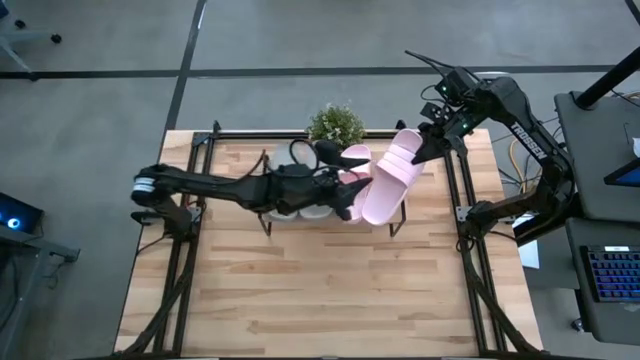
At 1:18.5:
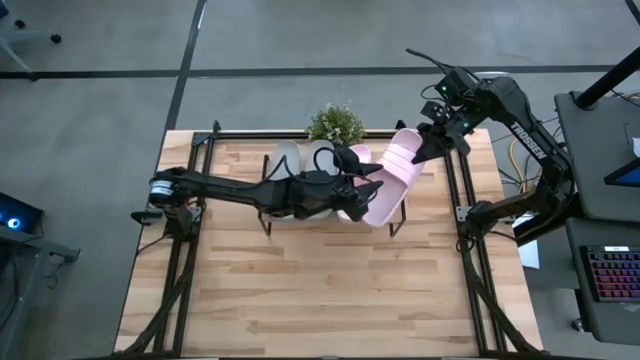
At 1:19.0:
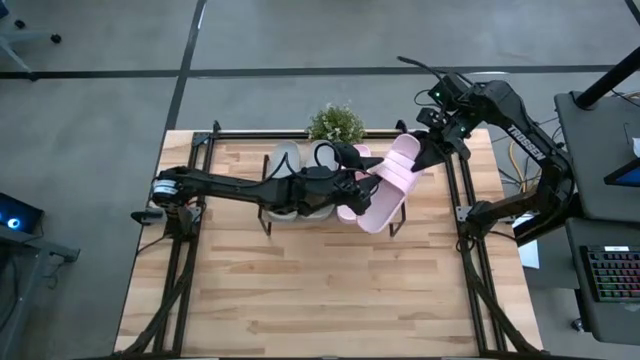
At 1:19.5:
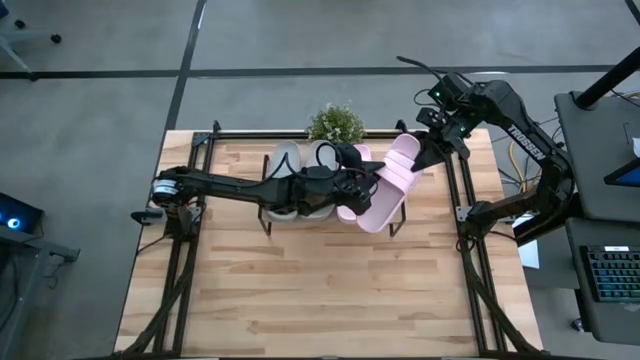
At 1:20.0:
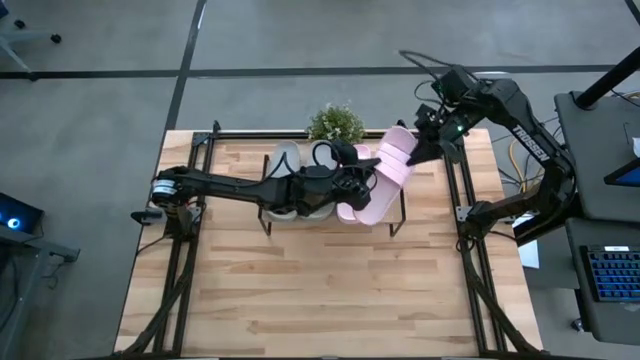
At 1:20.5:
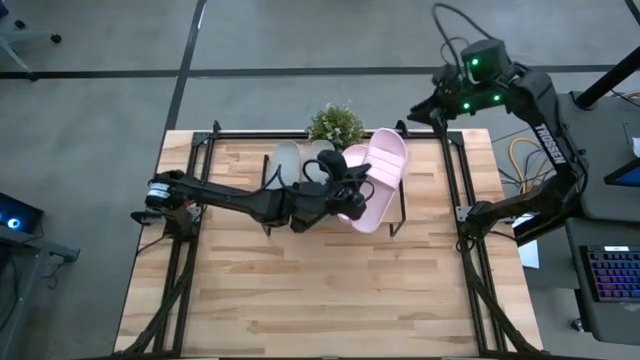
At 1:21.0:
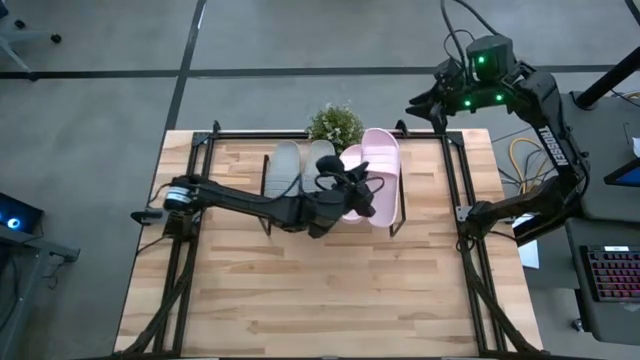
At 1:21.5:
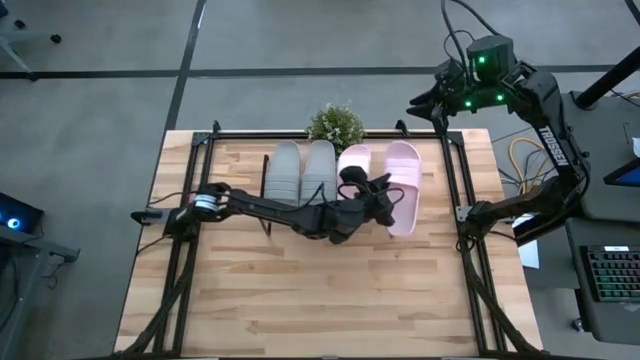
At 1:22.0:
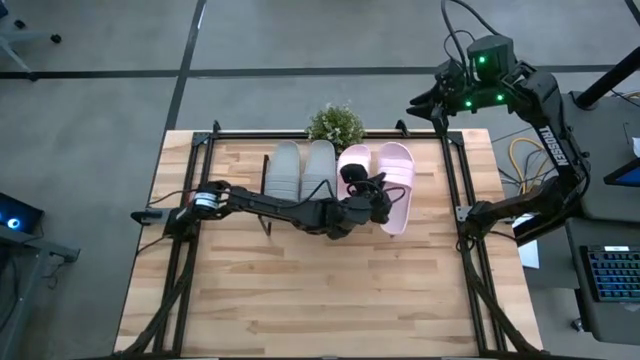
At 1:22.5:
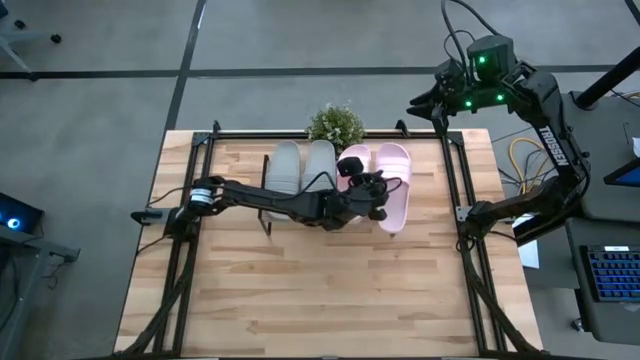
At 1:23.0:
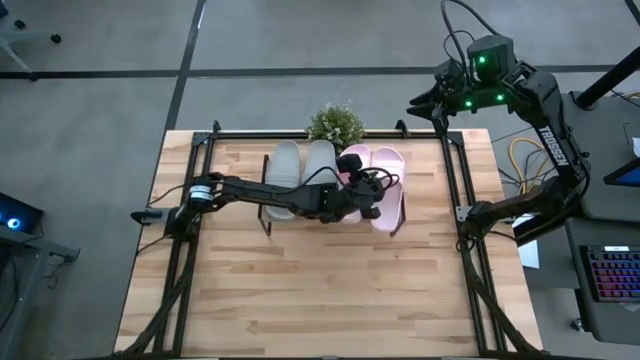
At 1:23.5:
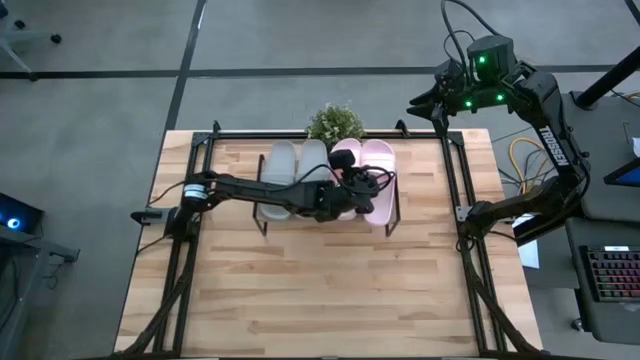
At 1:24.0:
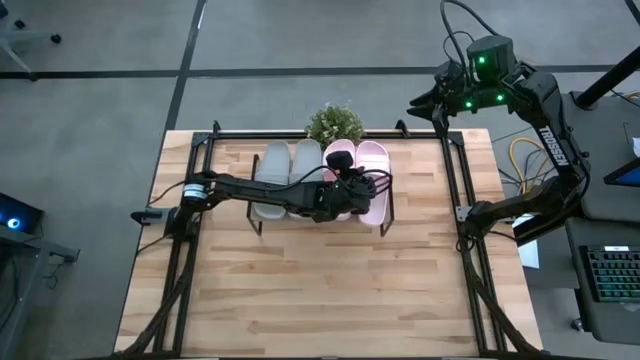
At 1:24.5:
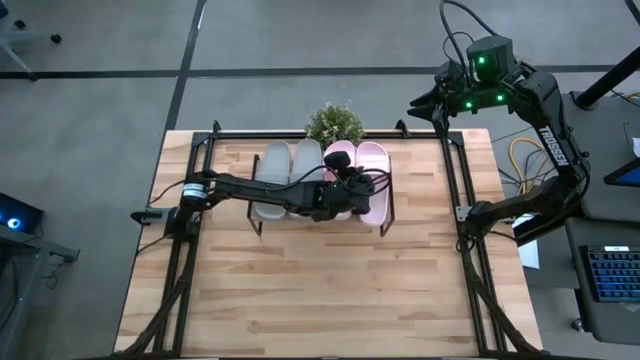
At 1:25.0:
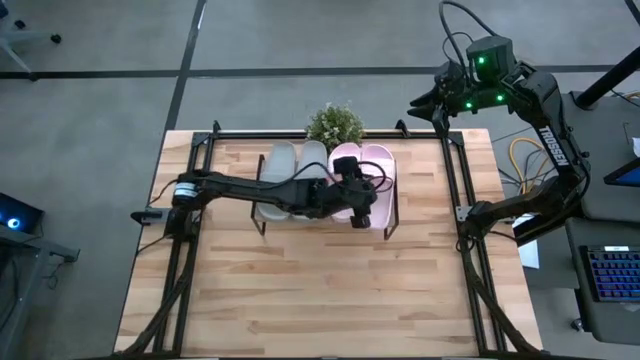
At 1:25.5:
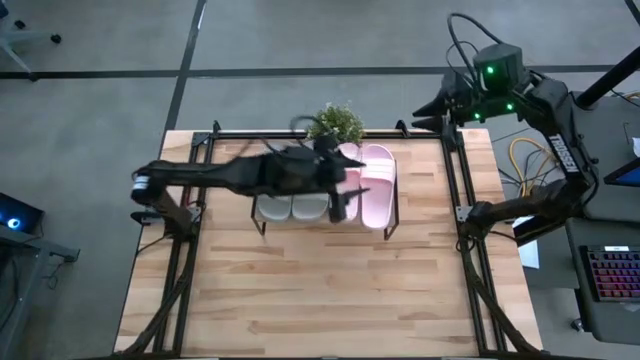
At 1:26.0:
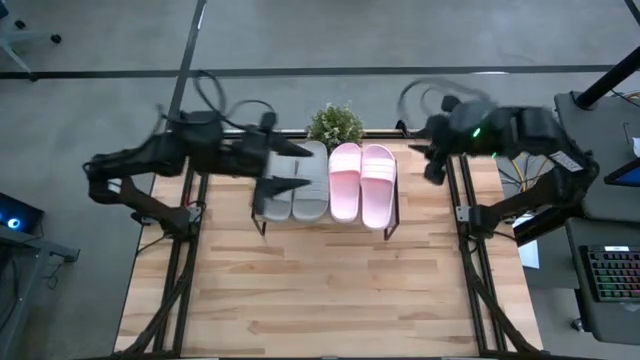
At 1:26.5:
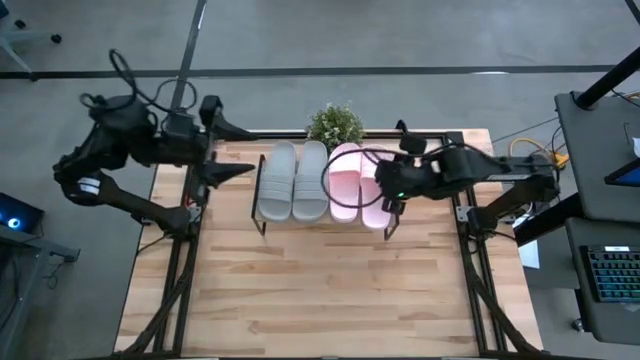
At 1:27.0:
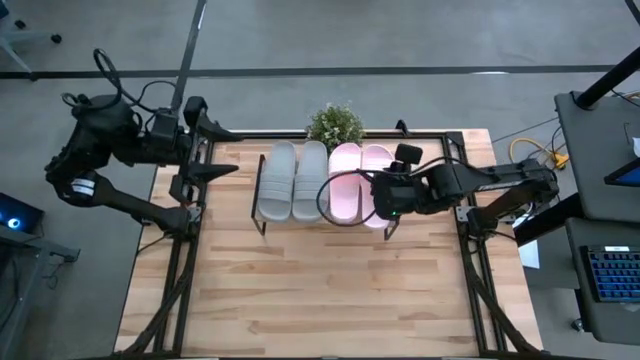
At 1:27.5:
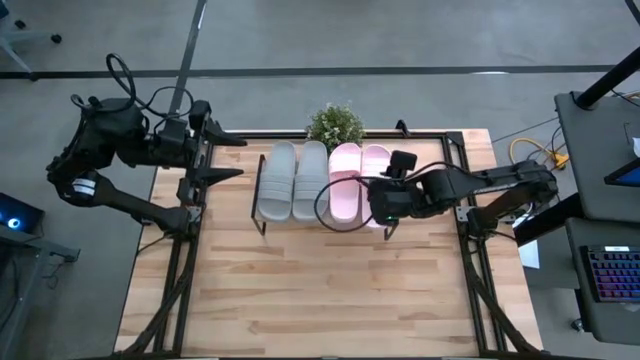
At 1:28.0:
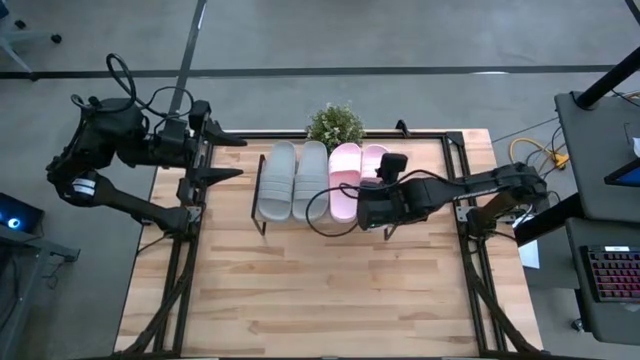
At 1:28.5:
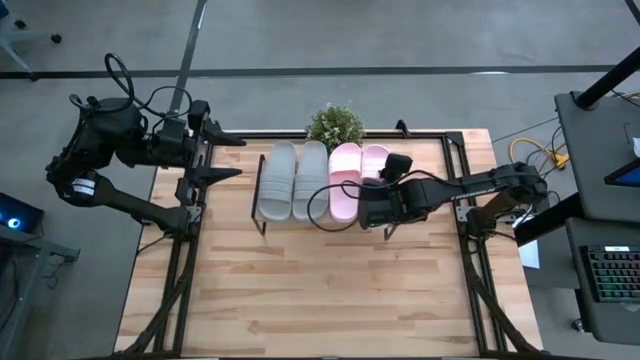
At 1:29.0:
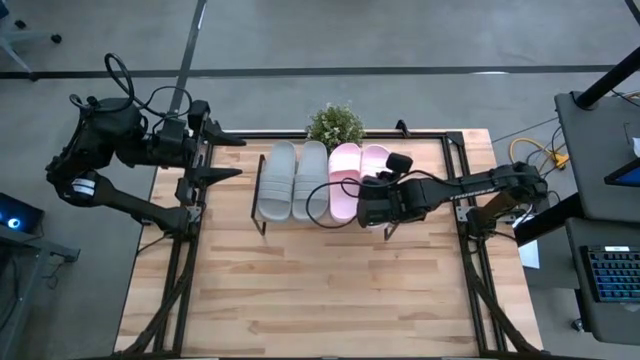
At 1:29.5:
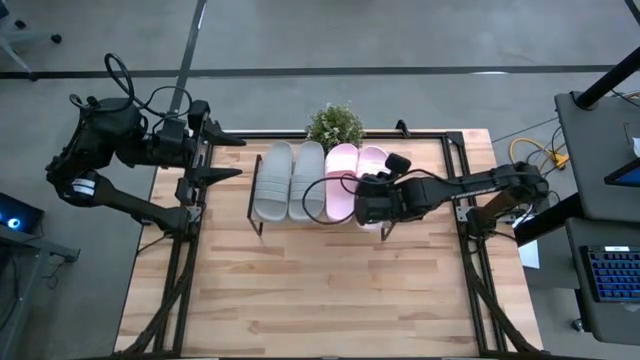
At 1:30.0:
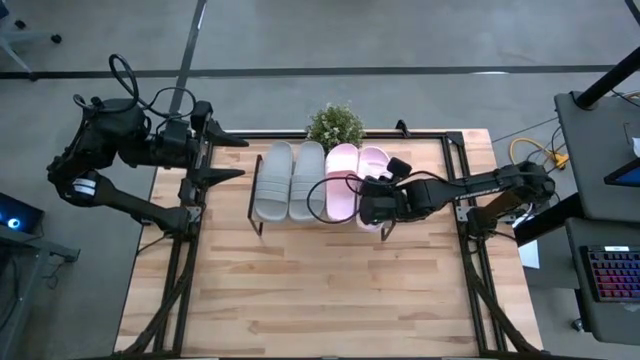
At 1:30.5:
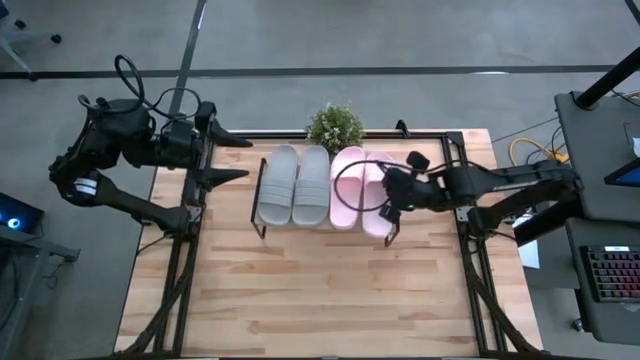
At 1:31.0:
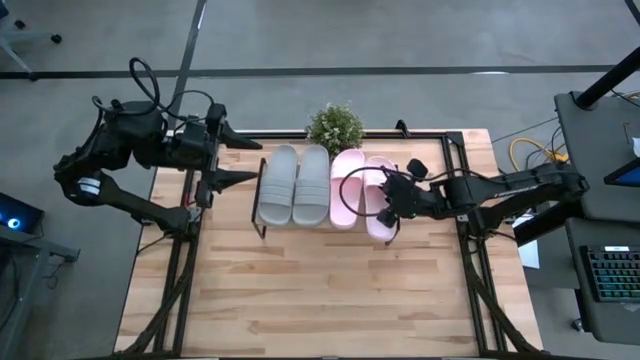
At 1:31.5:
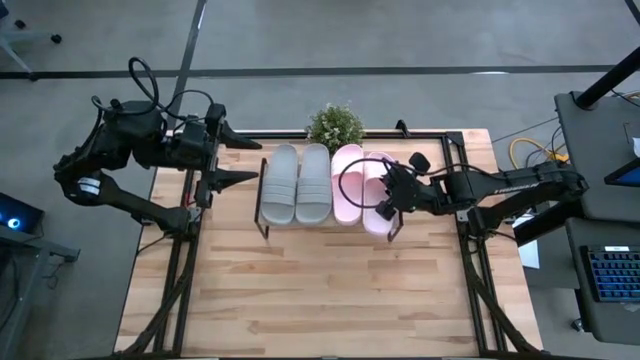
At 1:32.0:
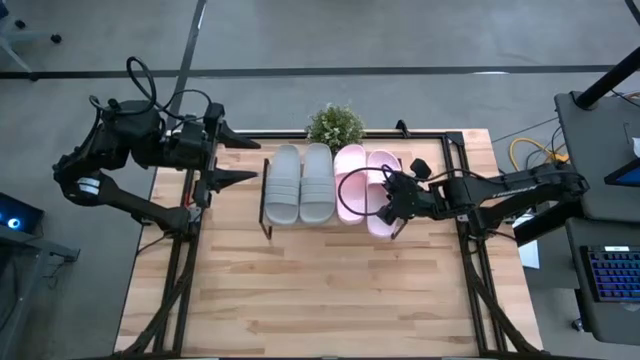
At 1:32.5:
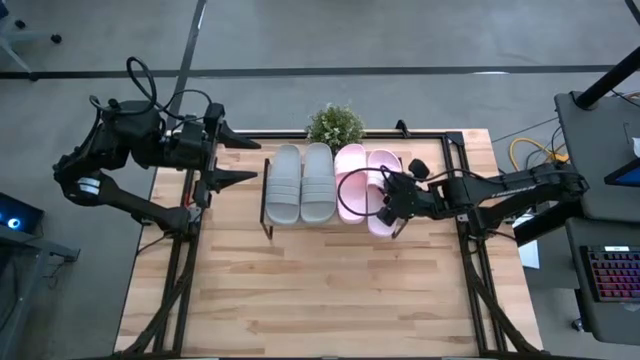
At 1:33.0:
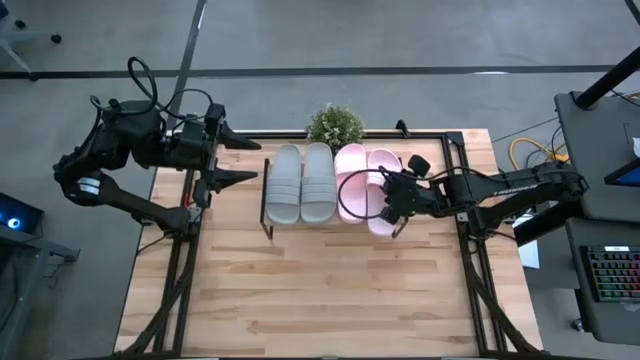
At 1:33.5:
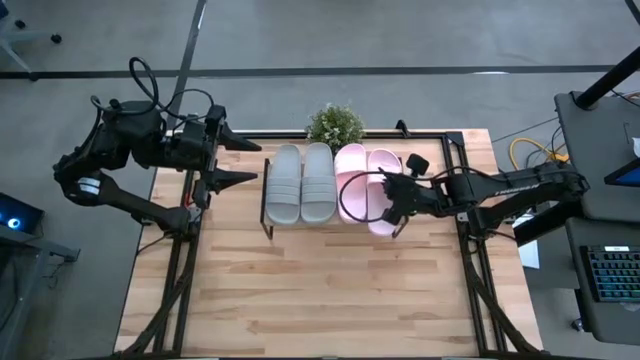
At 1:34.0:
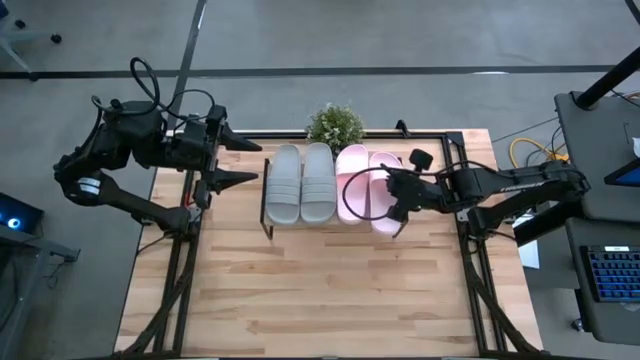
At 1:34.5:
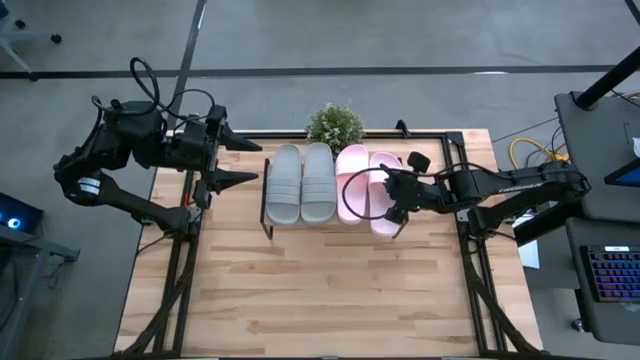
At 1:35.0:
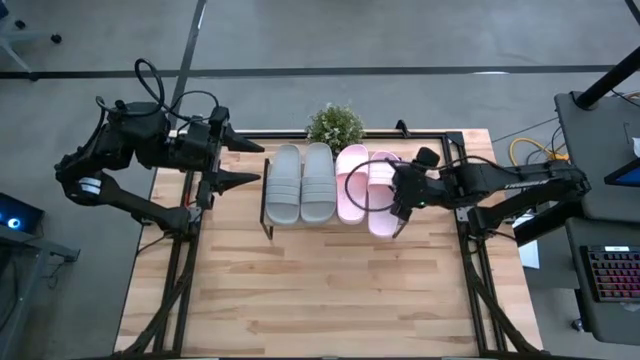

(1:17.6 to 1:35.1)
Task: Pick and place slides into the shelf
Put the right pink slipper on the shelf

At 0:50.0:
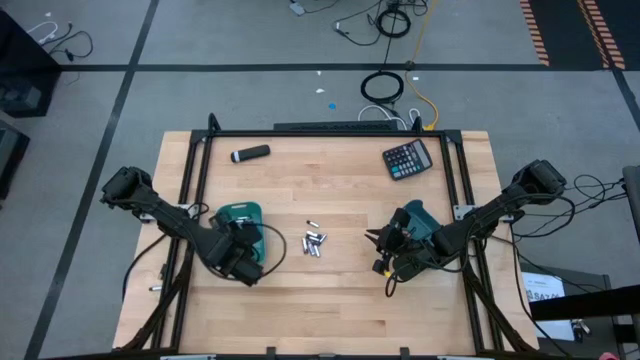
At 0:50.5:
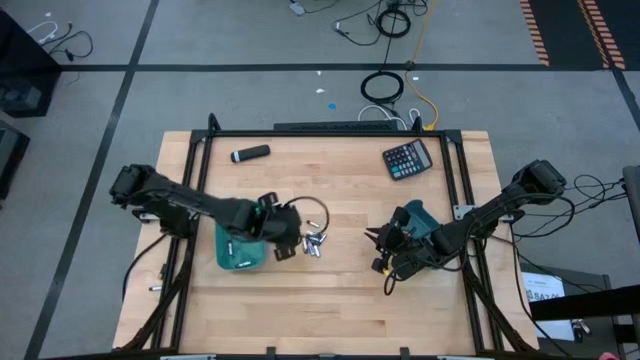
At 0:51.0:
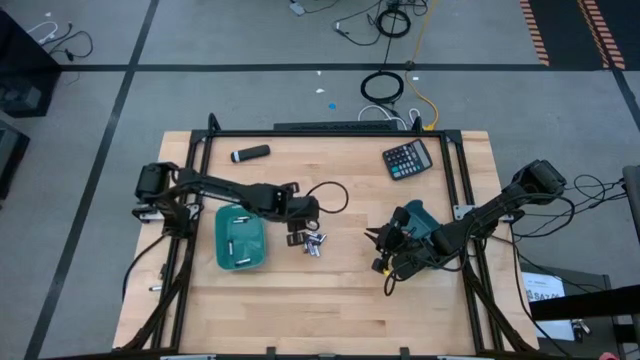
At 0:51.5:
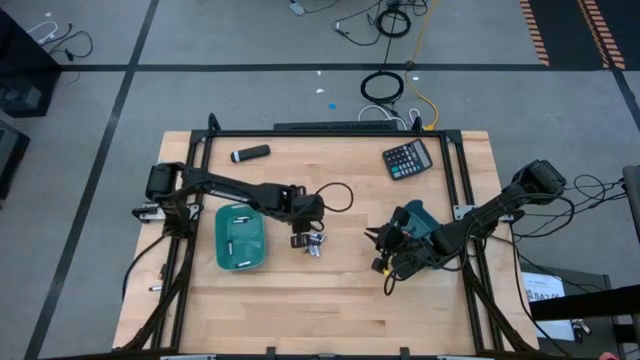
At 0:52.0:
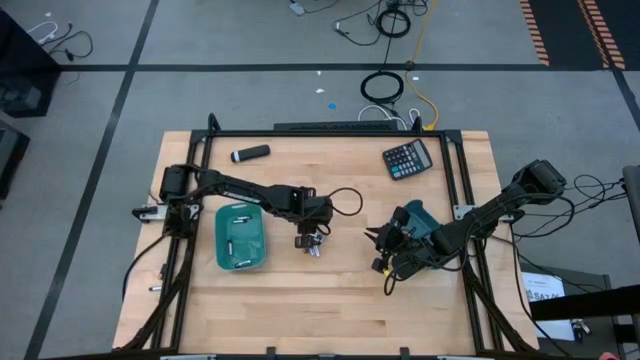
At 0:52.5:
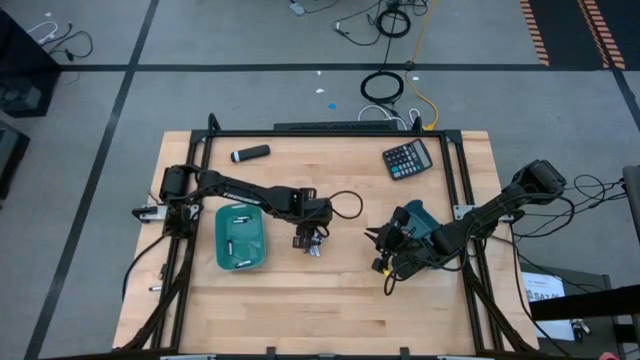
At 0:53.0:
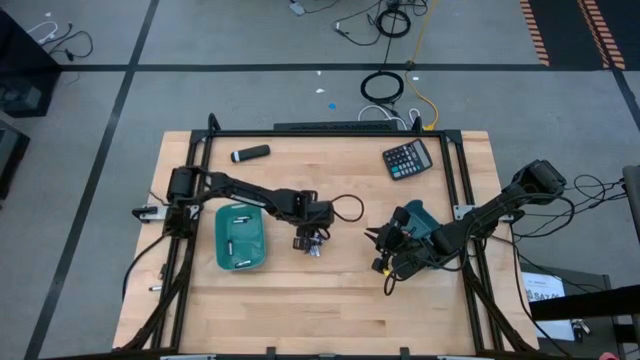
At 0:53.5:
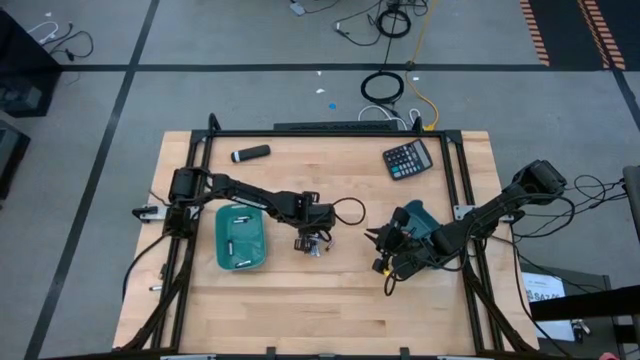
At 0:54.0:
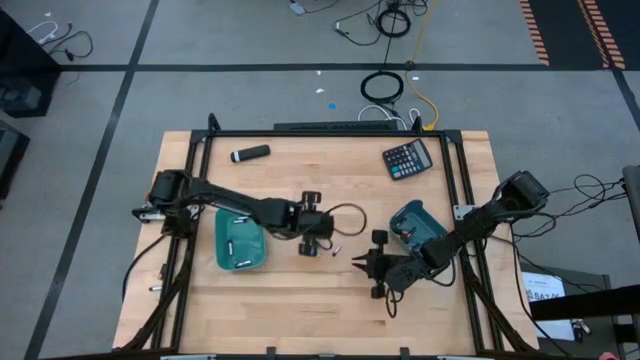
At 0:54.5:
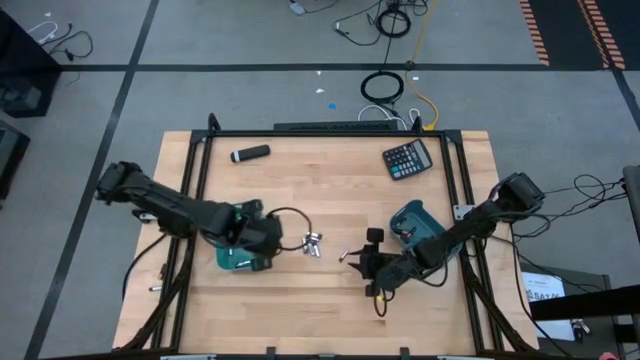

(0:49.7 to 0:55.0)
Task: Sort batteries
Put the silver battery into the light blue bin
